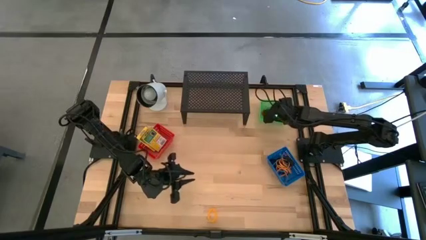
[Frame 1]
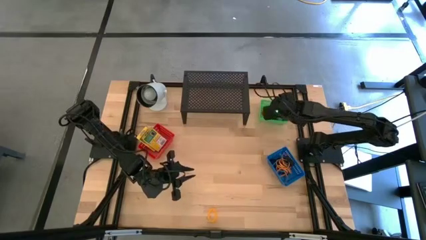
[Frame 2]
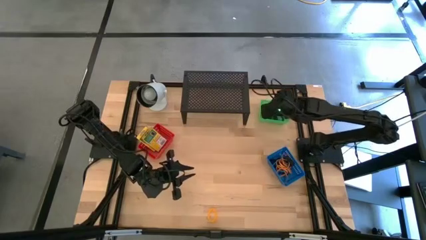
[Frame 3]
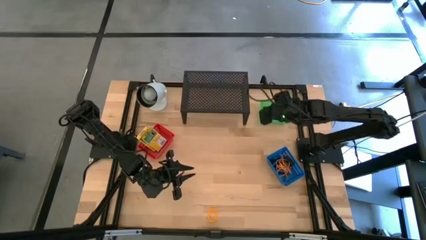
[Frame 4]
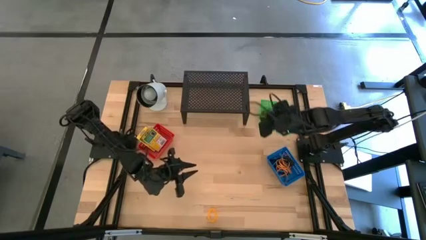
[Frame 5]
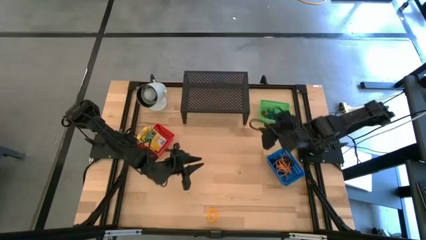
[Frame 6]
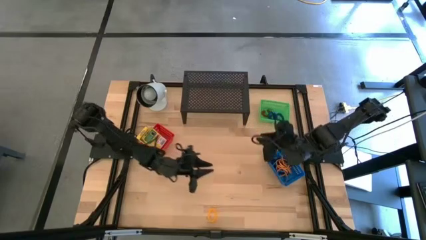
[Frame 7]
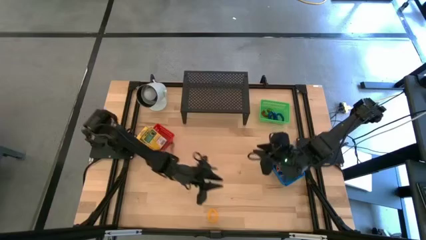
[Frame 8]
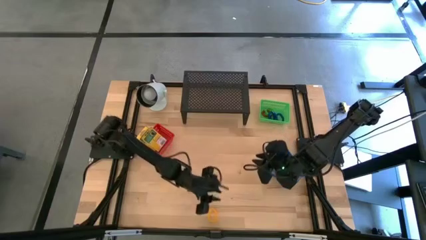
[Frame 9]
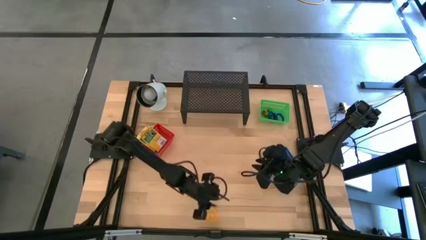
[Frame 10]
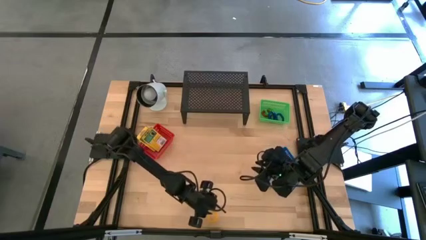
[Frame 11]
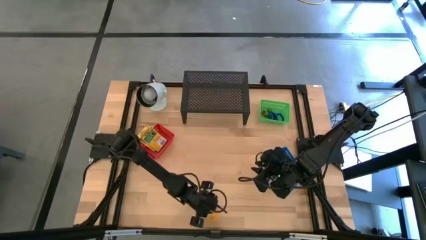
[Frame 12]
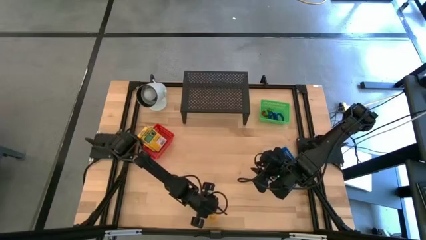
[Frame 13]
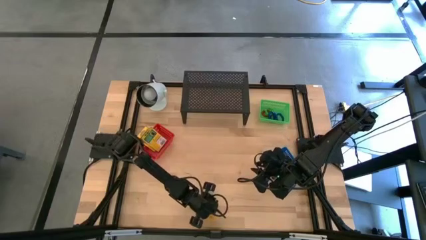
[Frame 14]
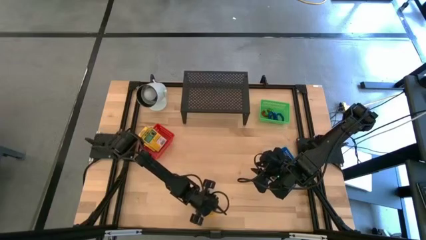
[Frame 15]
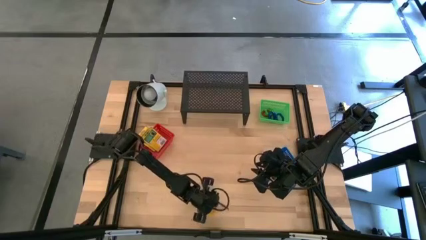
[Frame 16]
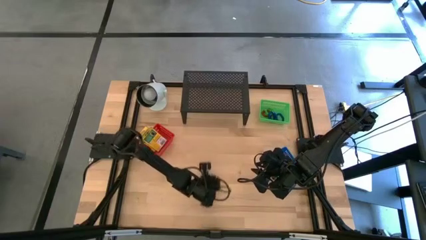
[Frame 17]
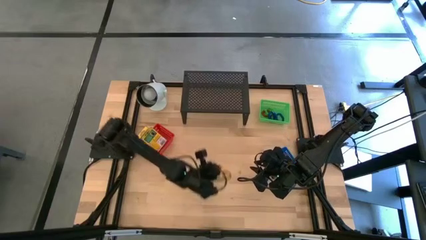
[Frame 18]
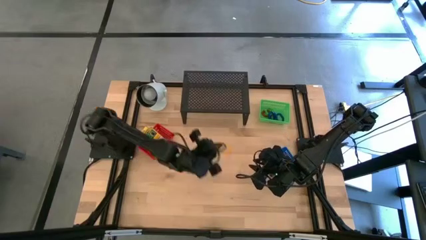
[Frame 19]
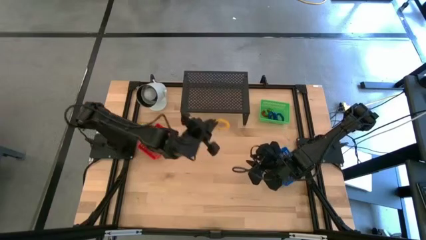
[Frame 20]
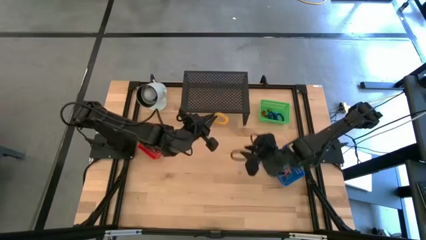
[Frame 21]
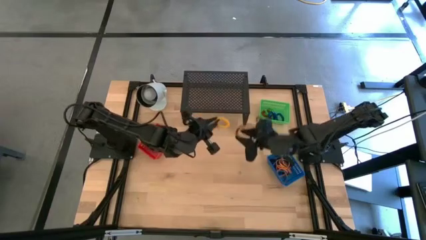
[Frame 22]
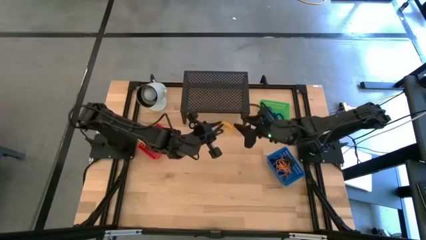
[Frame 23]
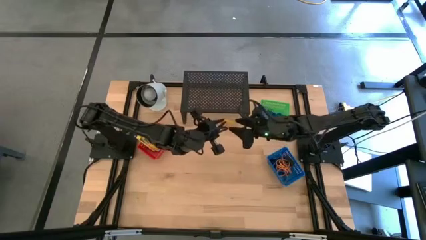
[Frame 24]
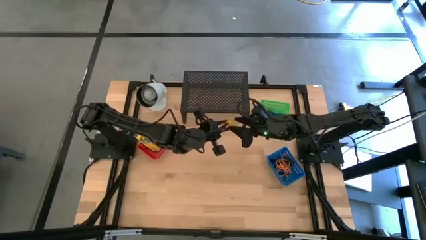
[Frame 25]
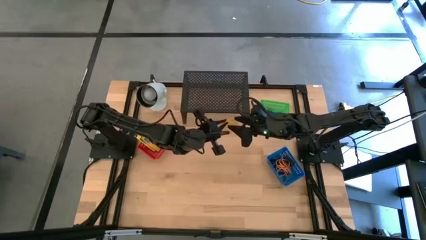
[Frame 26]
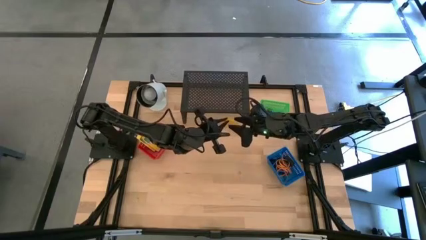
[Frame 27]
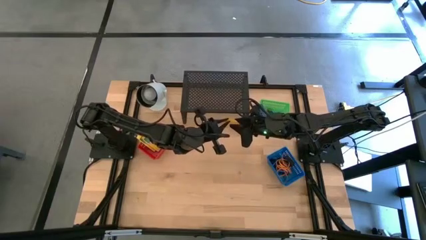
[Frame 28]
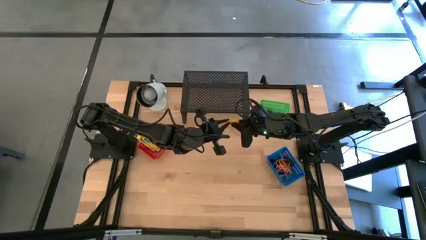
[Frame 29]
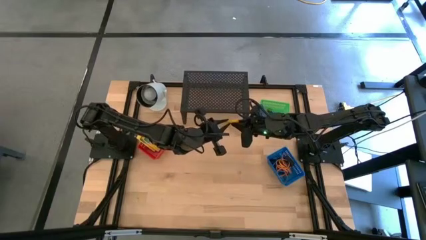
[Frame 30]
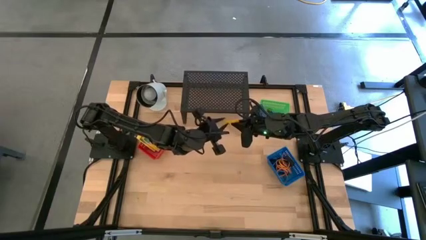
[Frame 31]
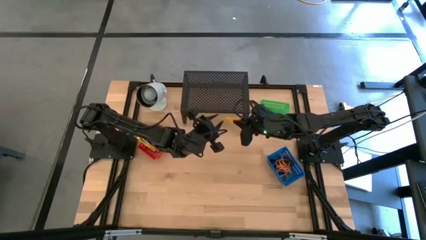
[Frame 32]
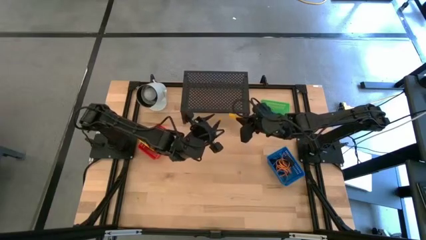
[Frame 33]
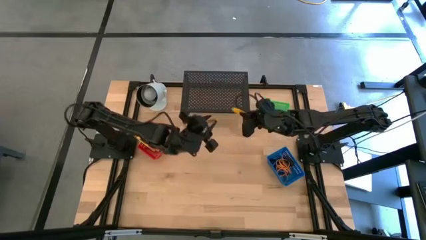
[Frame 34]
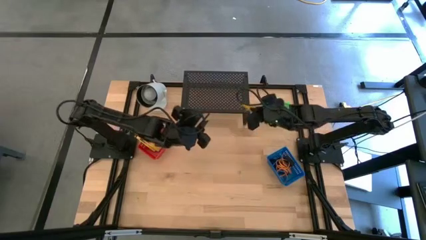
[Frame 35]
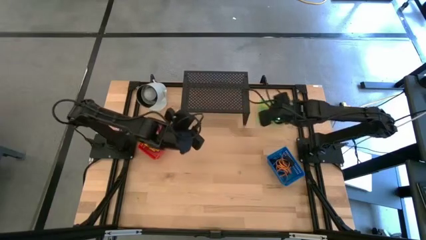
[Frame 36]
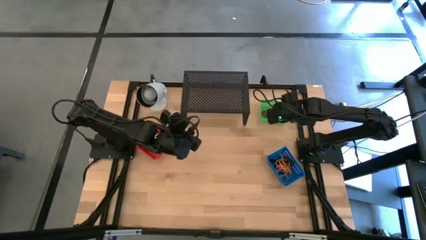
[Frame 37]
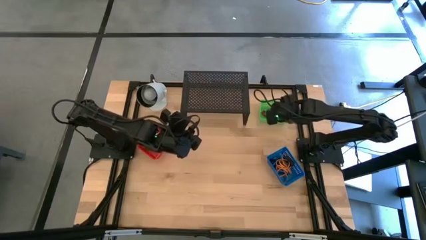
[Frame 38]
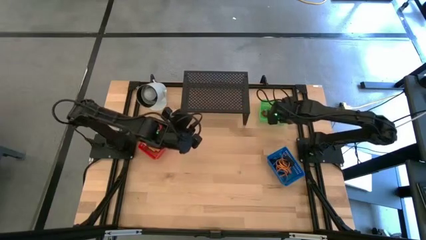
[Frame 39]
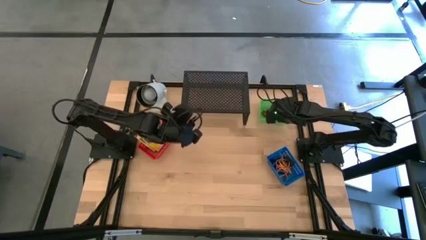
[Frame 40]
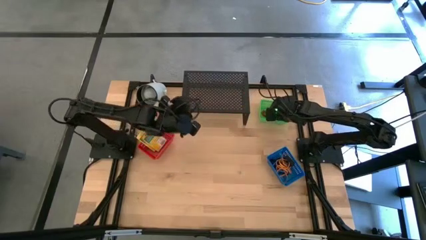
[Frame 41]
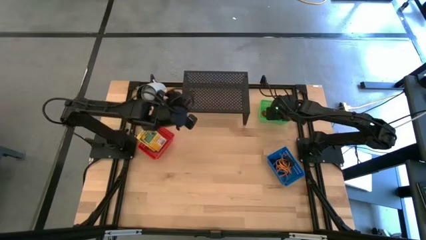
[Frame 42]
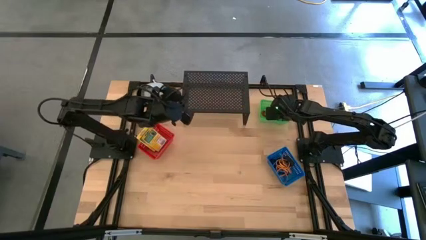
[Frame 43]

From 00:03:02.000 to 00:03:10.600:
Task: Pick & Place Office Desk Supplies
Put the yellow spring keychain into the green bin

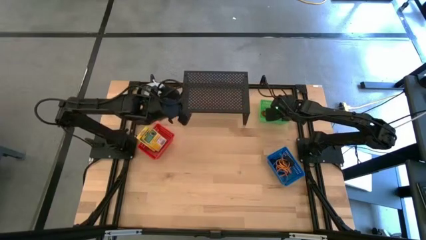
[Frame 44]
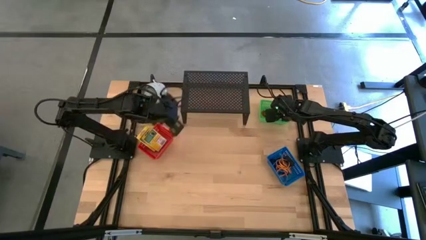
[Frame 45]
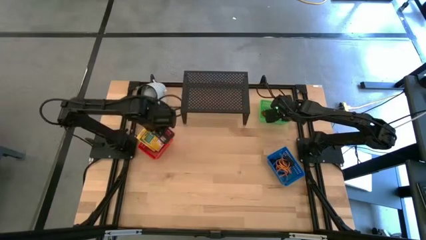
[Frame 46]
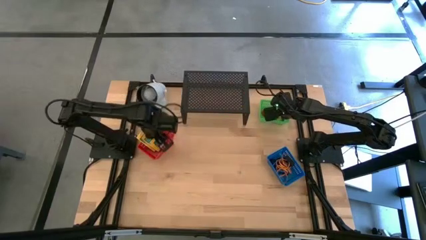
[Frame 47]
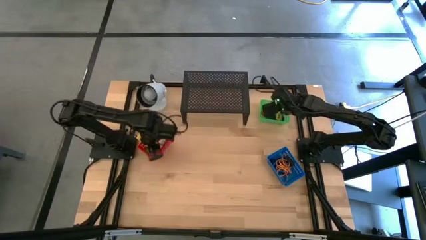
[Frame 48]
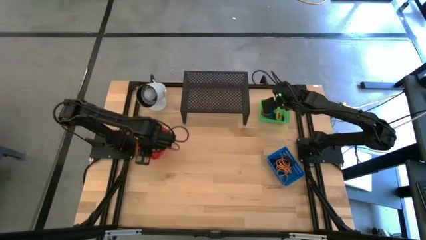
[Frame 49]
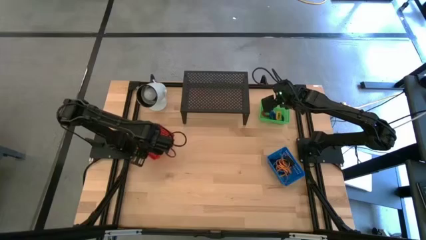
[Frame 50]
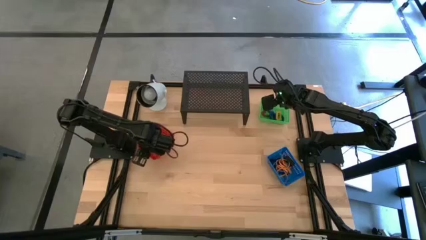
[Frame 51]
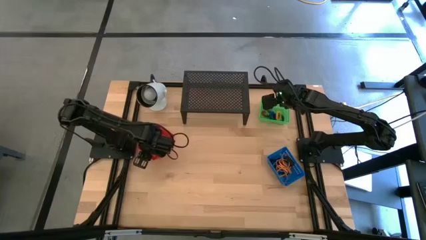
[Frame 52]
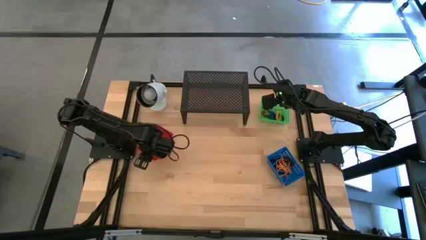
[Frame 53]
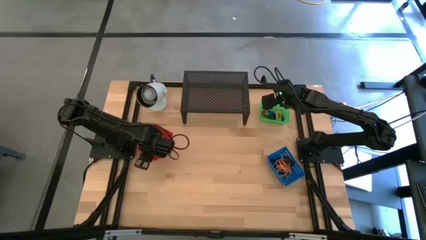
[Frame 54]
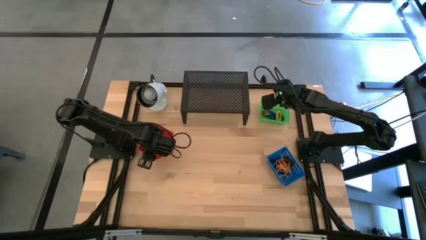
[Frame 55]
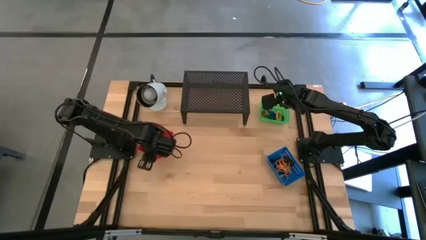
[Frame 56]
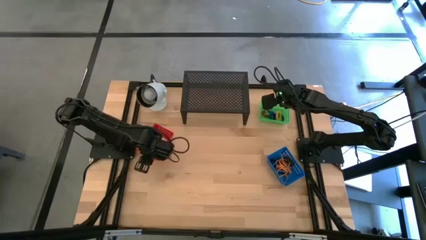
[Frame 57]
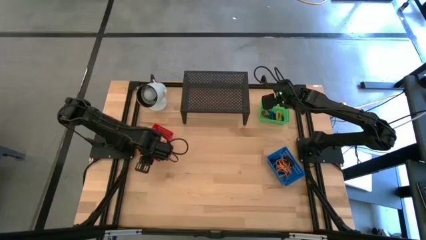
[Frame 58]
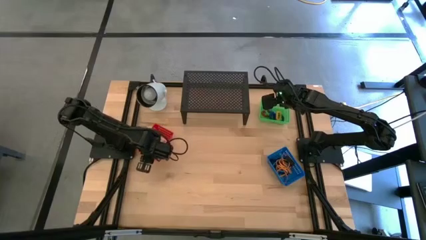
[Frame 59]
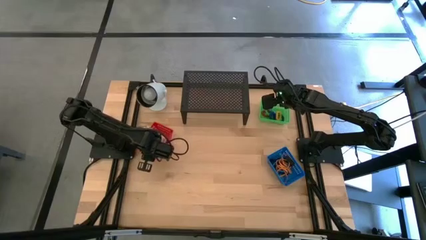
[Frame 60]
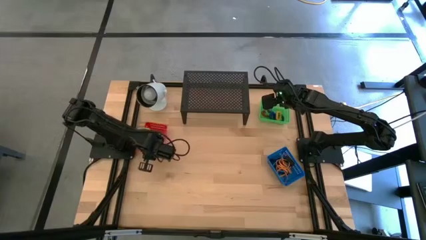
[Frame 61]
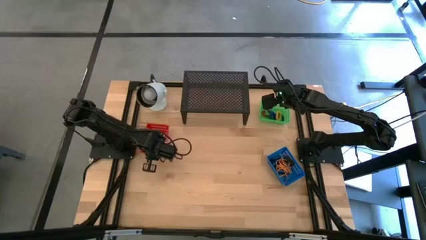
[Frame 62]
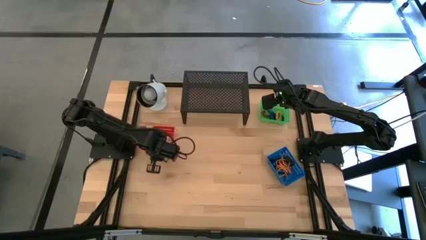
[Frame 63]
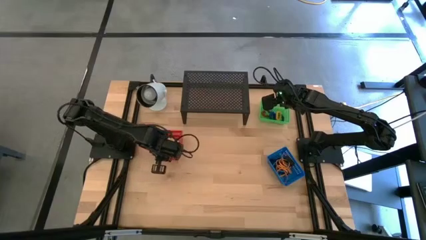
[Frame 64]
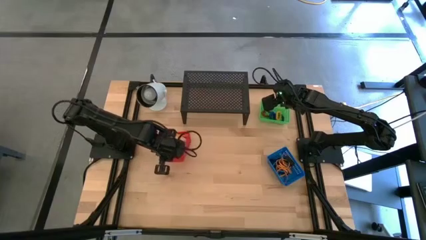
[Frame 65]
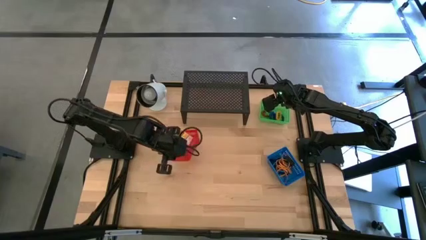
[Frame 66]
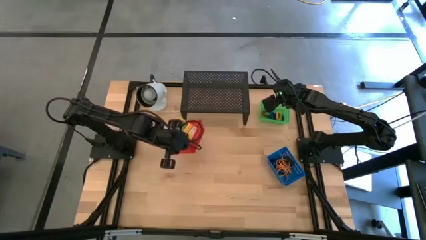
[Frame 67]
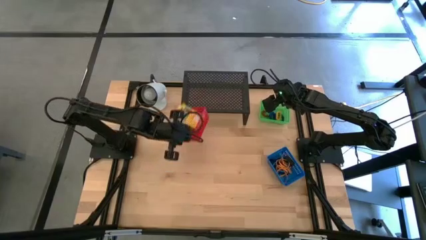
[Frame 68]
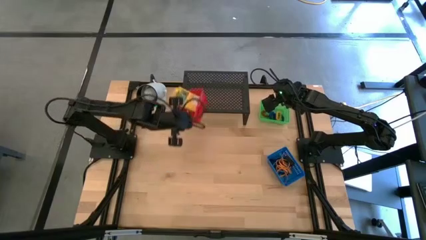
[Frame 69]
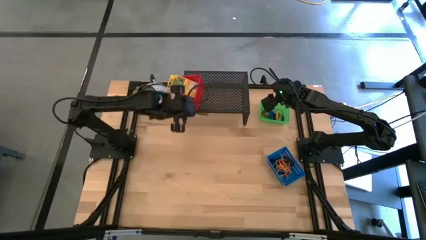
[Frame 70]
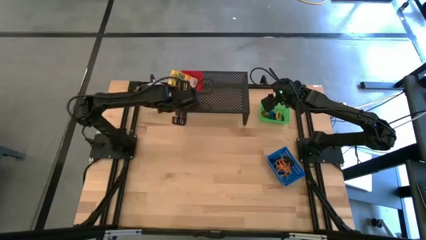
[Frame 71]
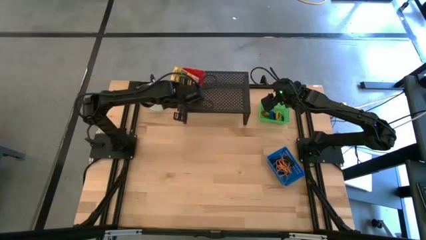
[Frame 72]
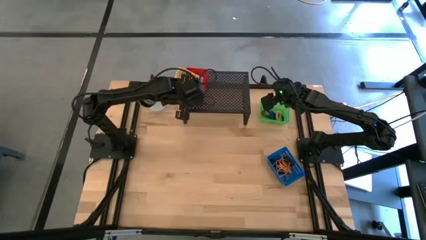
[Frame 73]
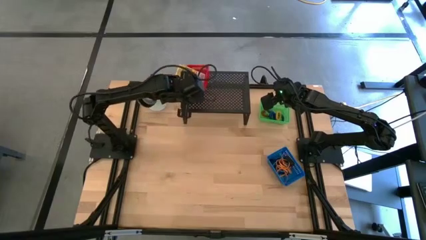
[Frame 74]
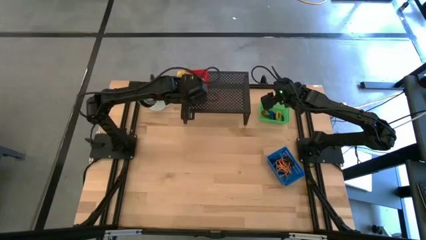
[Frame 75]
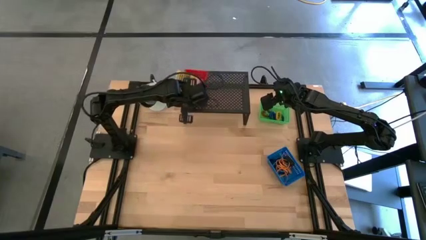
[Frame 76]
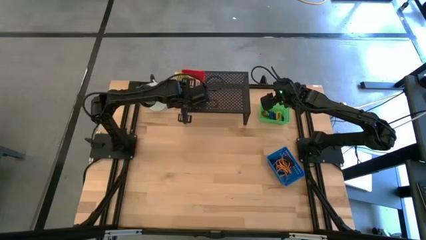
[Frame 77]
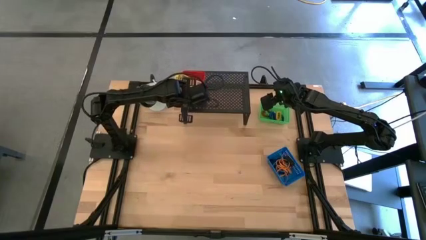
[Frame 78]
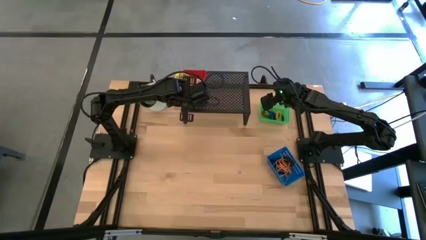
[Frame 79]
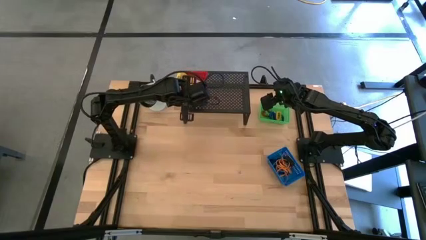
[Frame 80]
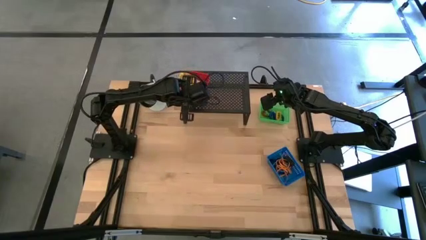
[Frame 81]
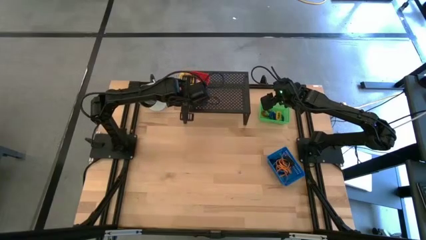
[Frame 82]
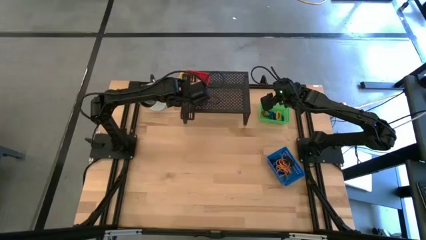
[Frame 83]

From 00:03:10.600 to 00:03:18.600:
Put the red bin on the shelf
